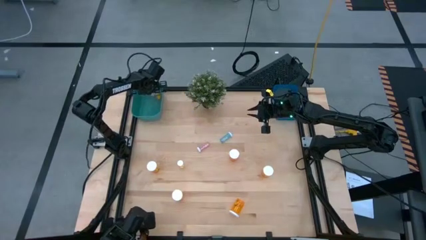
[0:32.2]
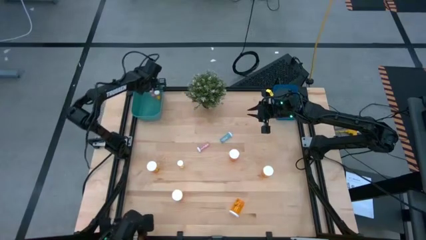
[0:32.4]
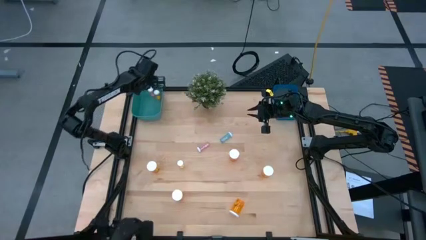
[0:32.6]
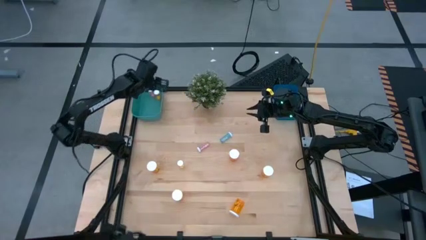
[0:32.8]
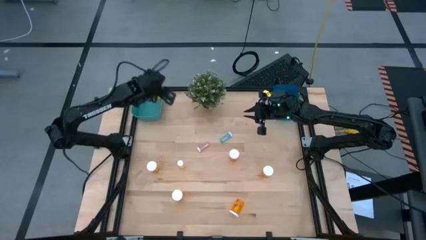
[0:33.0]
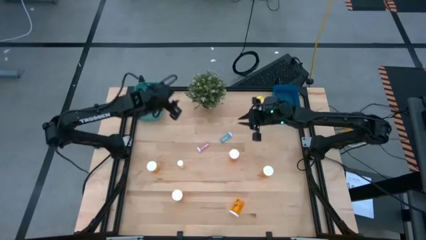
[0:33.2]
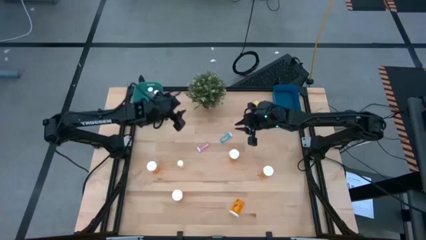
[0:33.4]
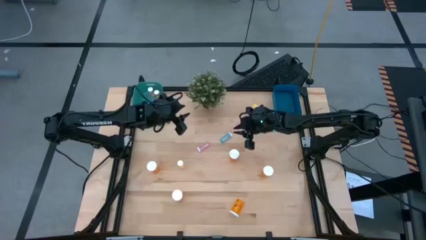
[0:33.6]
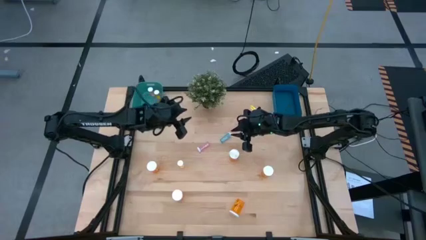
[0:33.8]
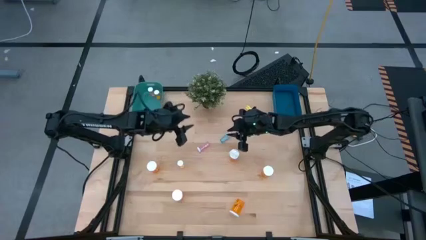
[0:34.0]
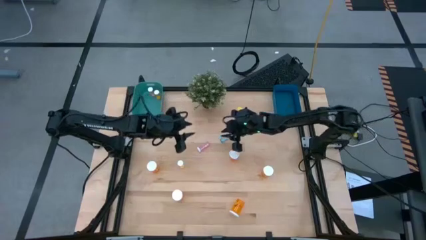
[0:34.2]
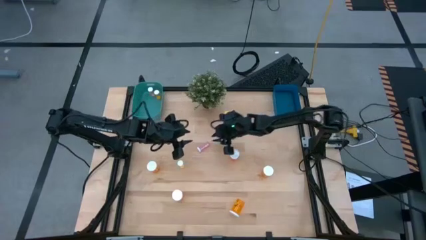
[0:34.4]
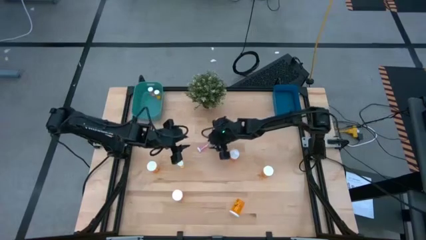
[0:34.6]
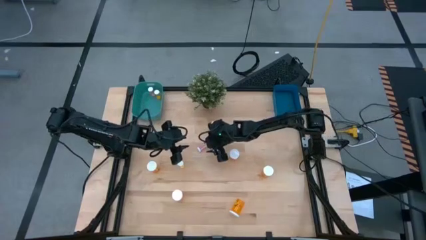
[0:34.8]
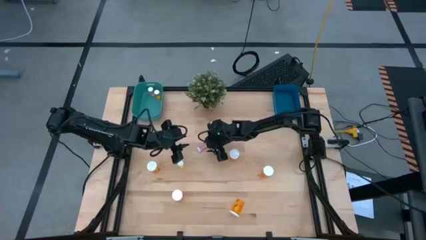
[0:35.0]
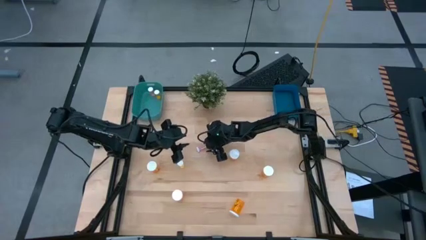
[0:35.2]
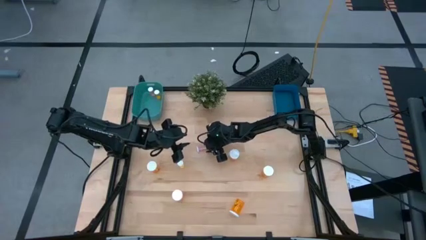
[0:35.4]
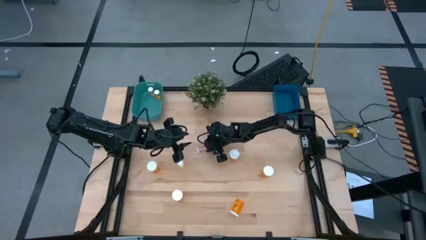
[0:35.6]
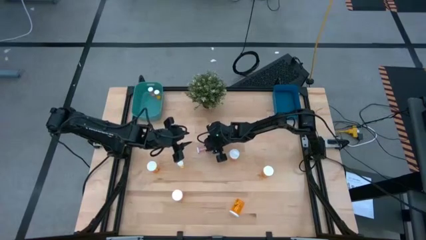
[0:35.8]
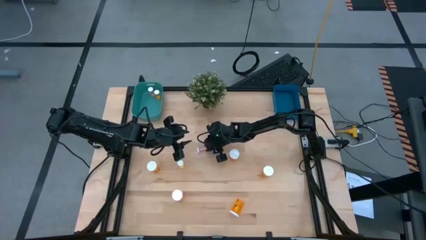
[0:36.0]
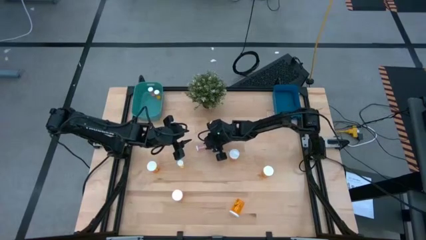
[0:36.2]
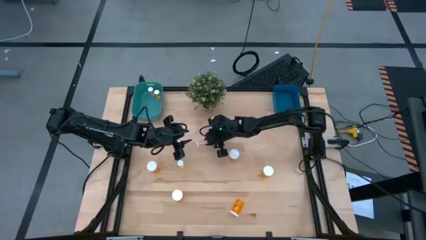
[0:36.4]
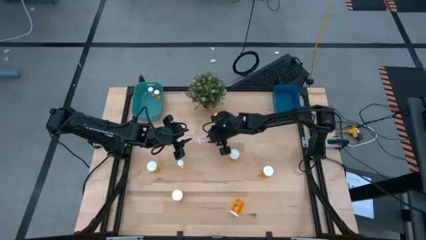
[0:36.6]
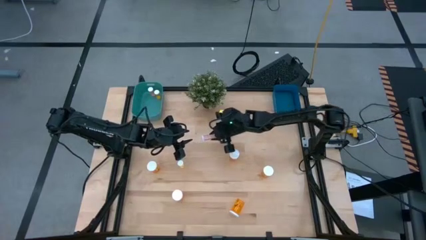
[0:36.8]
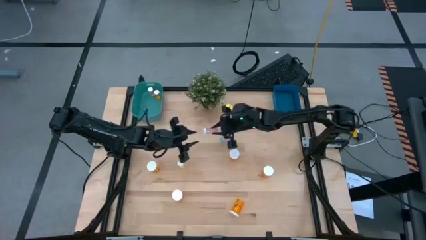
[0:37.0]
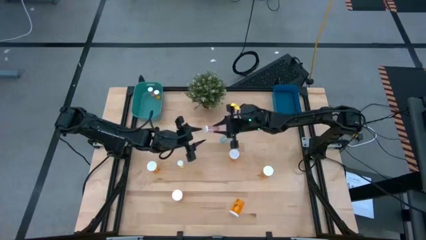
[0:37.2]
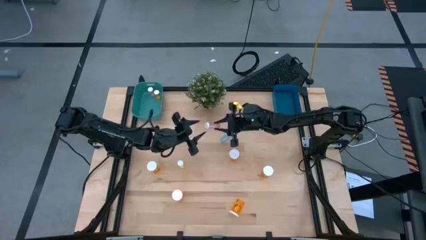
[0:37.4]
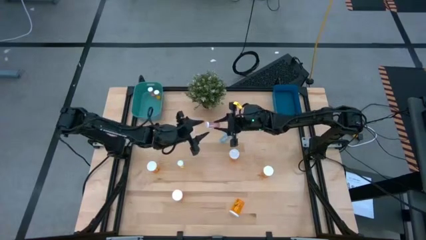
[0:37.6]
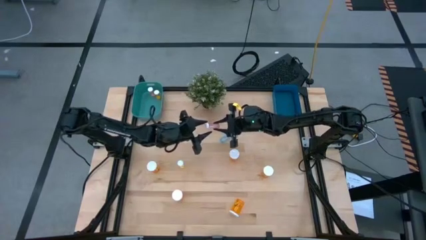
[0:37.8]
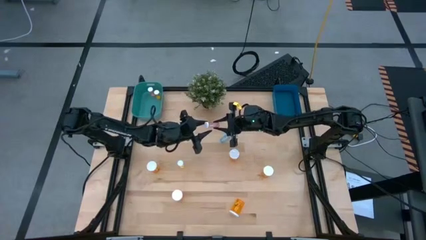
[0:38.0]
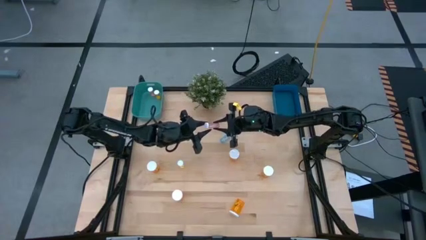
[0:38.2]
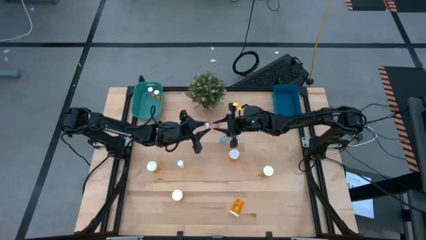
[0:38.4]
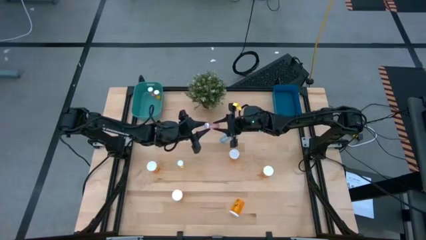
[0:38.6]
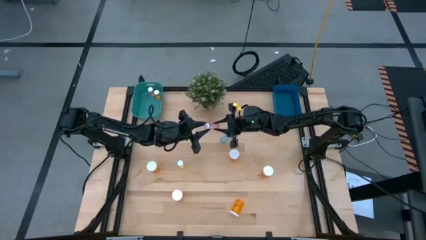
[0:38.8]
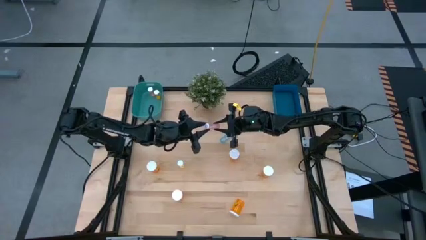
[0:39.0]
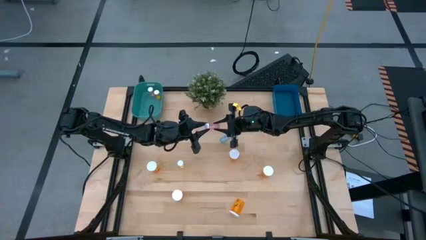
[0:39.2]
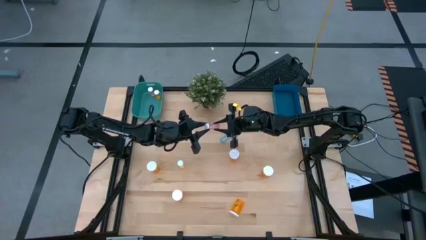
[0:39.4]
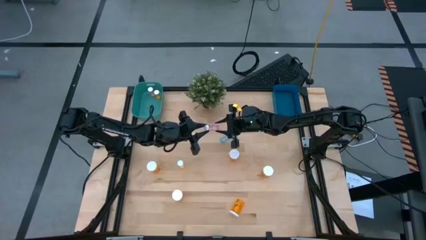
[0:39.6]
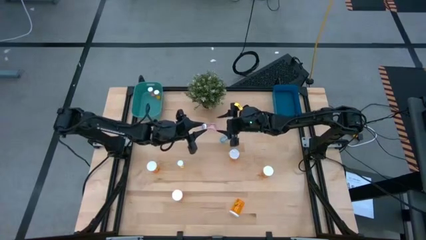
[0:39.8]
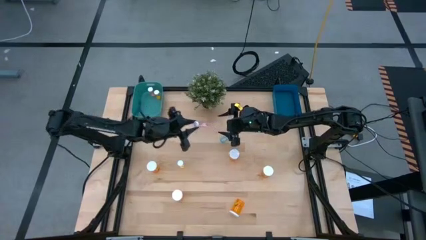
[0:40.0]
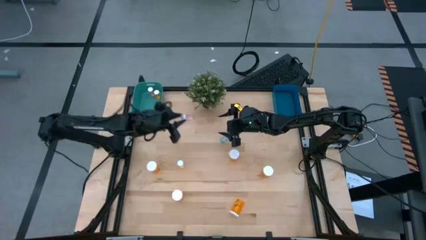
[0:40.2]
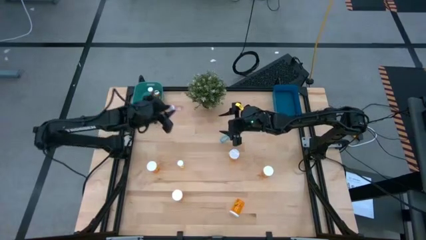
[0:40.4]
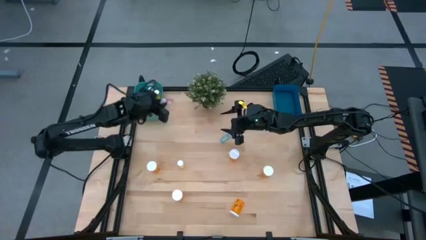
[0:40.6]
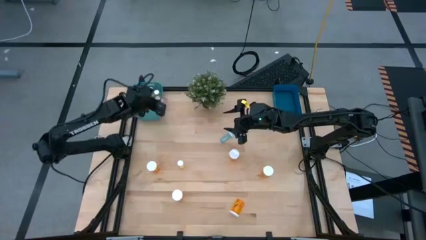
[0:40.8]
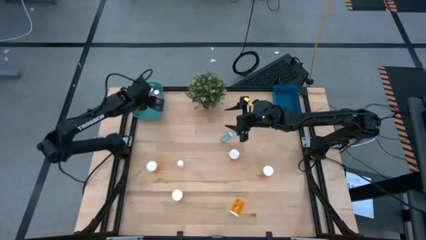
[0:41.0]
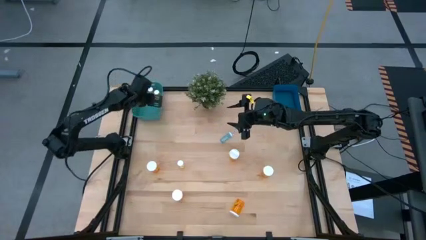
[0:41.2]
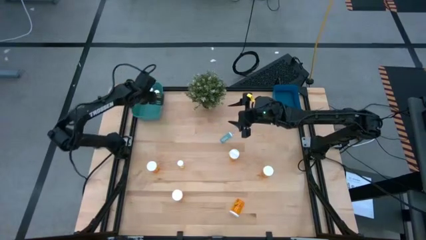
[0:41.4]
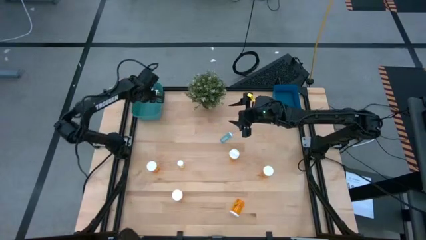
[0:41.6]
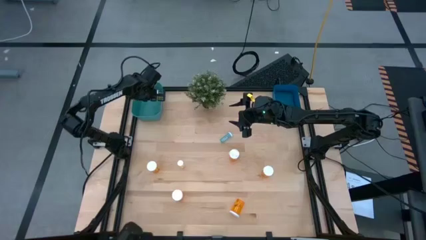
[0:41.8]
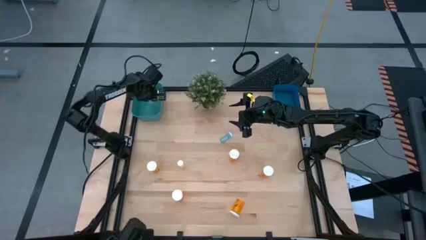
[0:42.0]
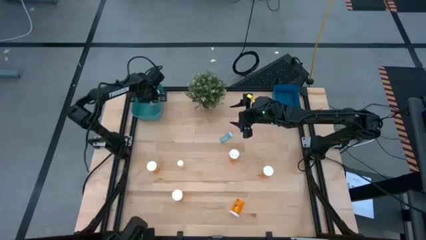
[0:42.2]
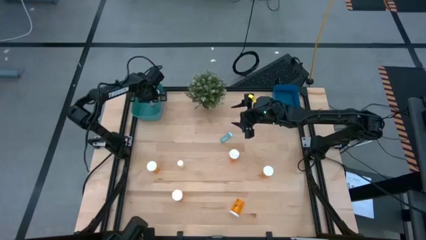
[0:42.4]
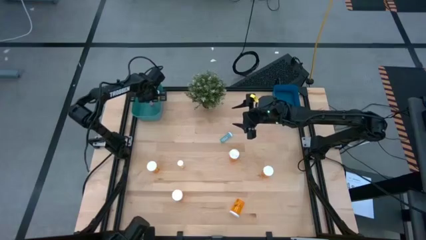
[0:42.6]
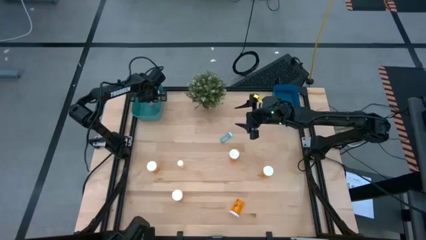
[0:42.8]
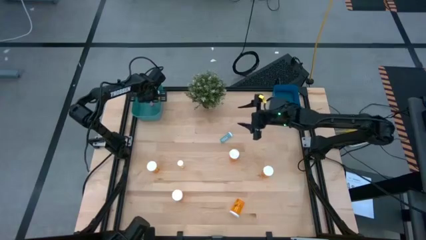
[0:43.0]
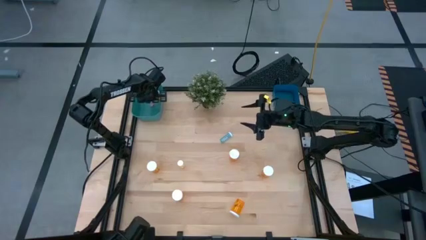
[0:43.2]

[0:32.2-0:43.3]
Task: Pick and place medicine bottles into bin by pill shape (circle, oval)
Put the pink pill bottle into the green bin

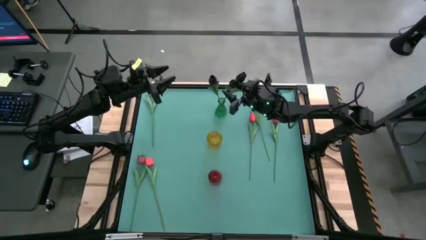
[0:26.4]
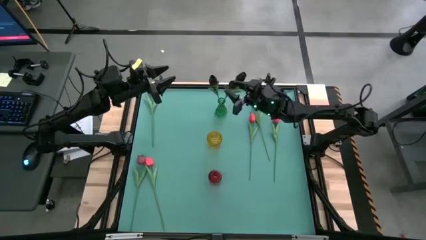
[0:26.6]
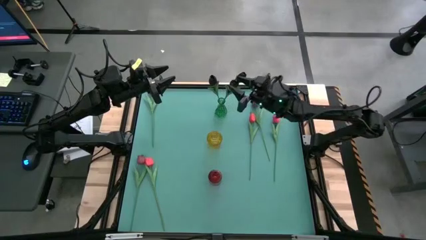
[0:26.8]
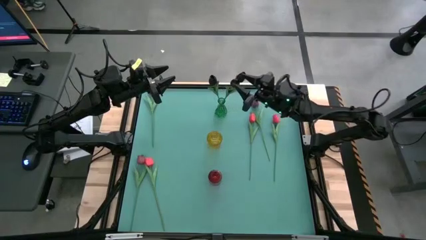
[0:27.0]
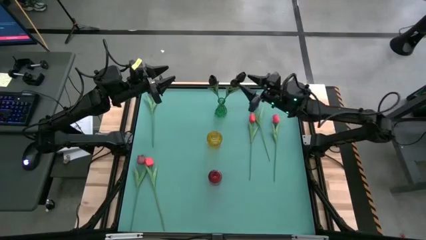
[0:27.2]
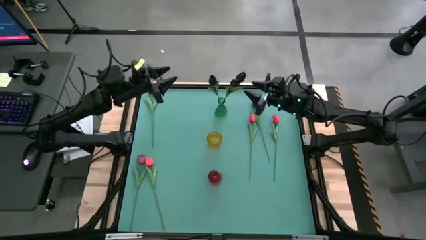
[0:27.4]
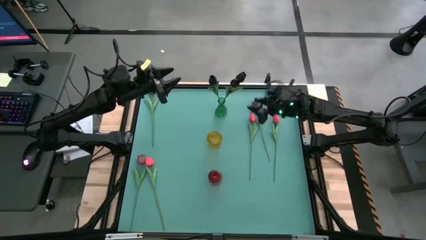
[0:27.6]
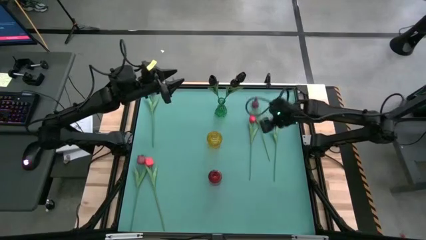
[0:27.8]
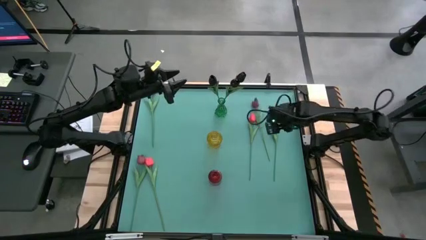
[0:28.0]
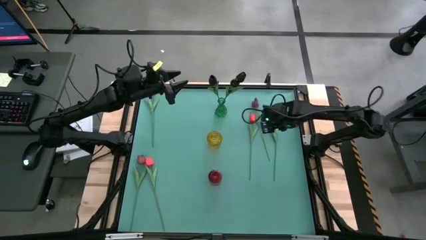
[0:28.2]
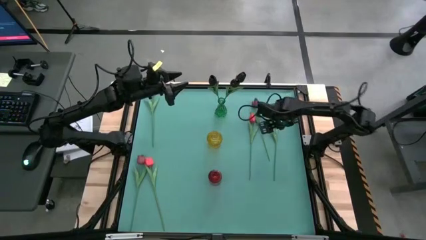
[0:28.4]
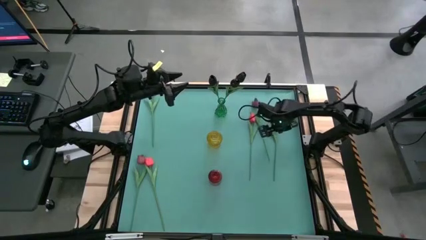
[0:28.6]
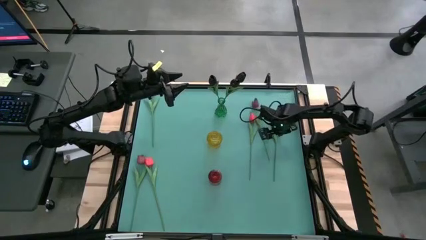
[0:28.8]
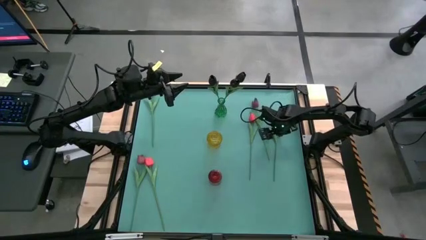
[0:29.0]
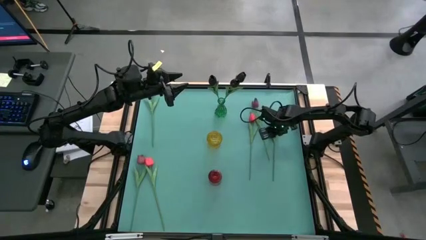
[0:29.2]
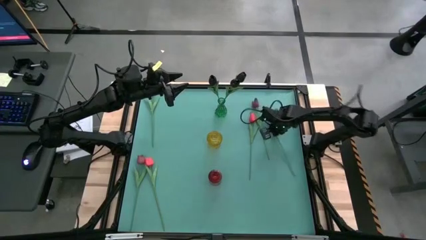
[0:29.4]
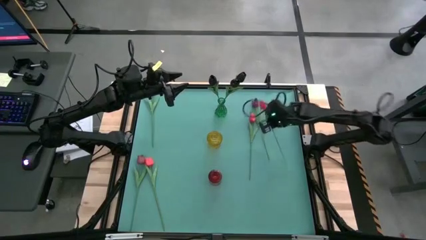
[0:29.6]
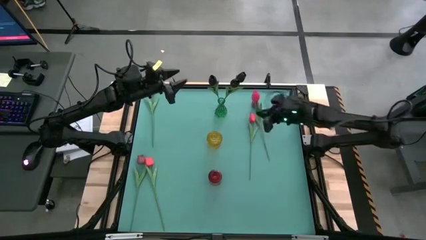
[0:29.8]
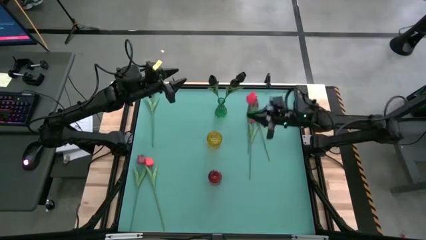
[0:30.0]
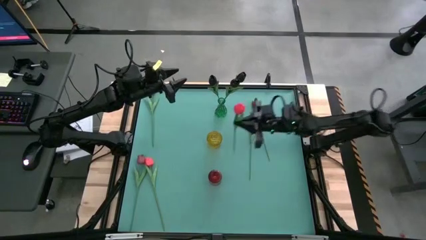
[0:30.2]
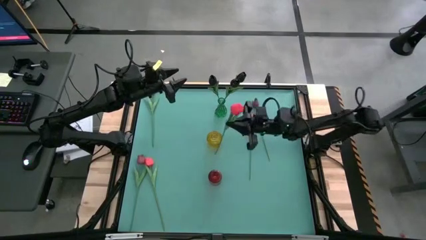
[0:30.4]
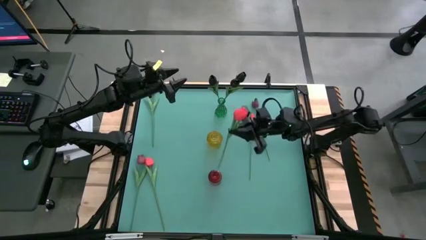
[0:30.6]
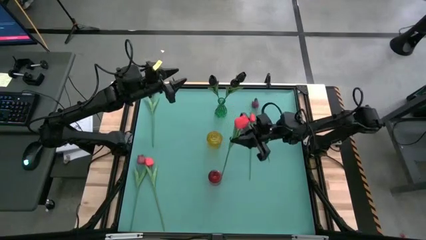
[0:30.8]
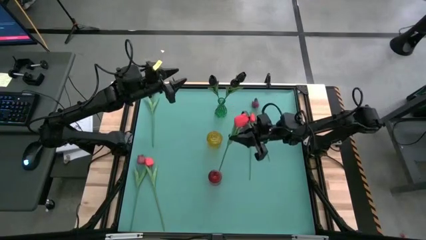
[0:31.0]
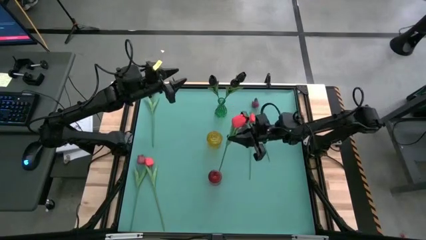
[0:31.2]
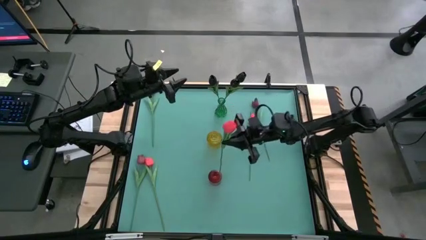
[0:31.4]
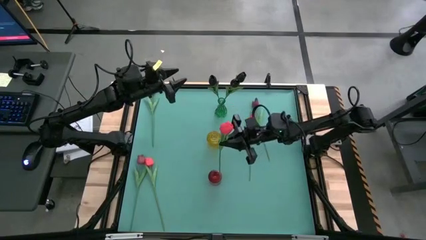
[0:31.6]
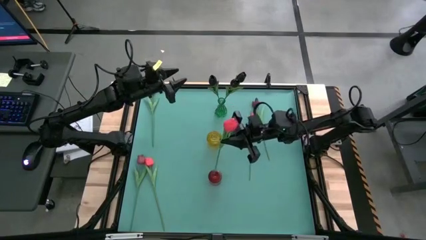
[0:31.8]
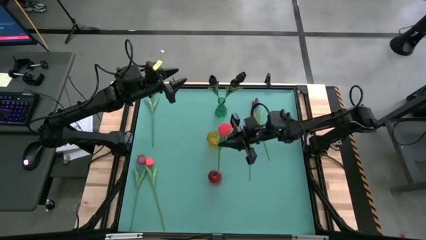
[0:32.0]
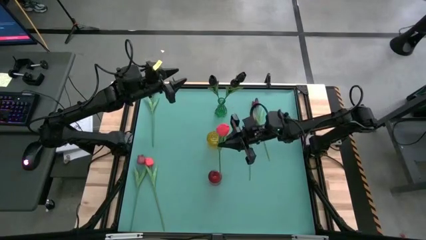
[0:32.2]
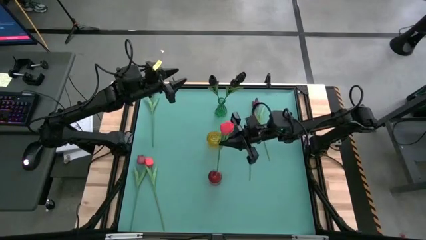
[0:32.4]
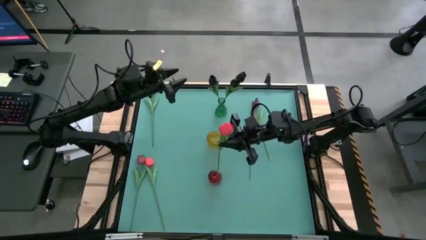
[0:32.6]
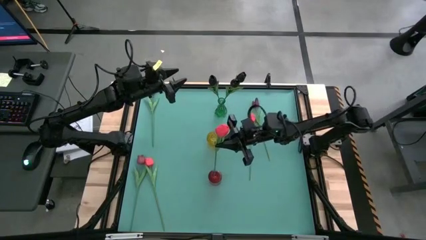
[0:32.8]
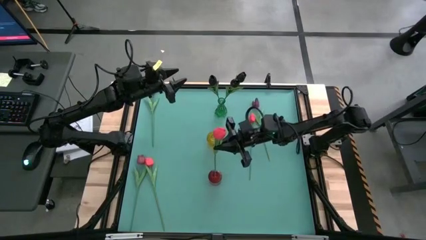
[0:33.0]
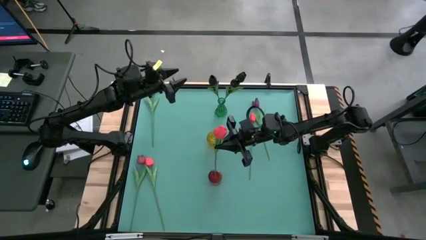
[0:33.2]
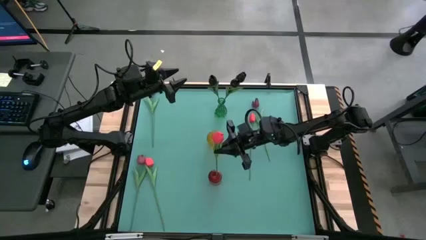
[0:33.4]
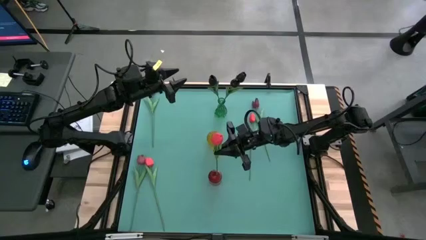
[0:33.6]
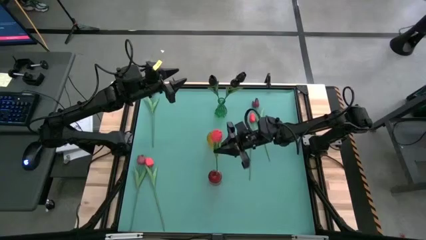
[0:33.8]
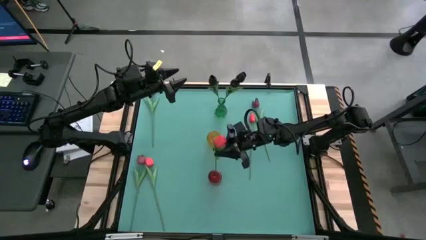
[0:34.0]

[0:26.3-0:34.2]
Task: Sort flowers into vase by color
Put the top right pink tulip into the red vase
